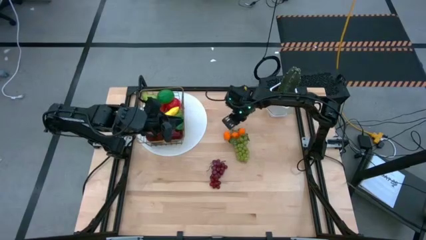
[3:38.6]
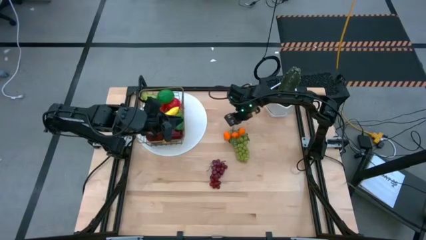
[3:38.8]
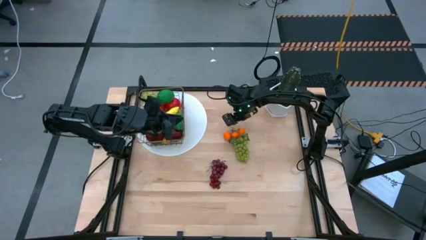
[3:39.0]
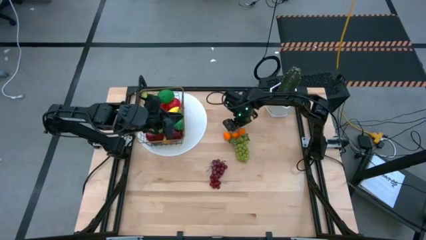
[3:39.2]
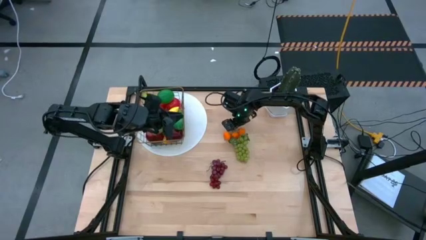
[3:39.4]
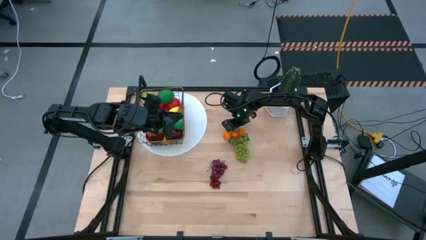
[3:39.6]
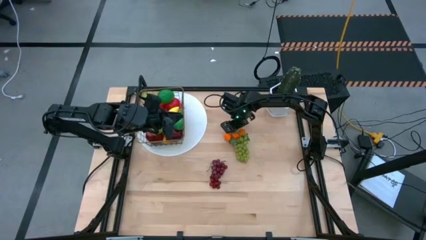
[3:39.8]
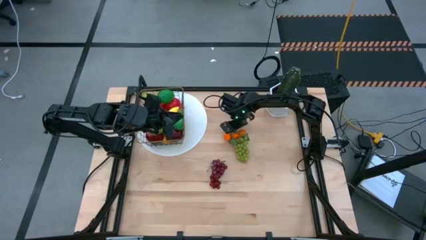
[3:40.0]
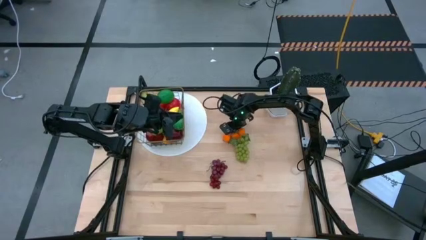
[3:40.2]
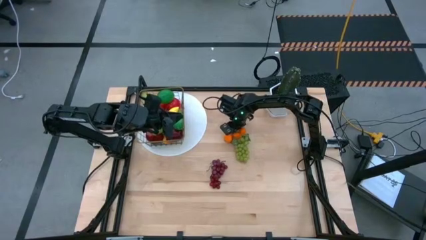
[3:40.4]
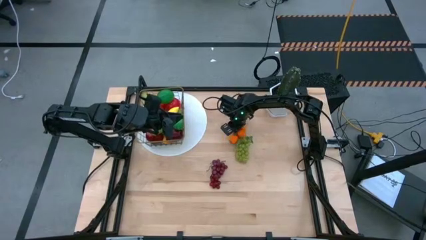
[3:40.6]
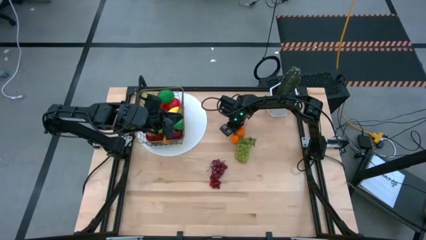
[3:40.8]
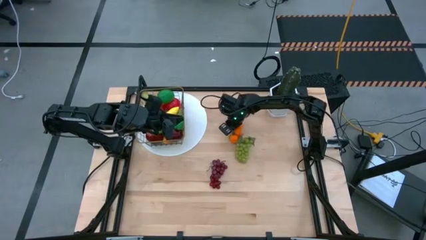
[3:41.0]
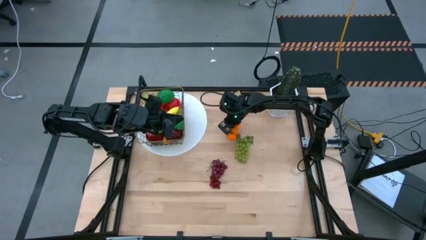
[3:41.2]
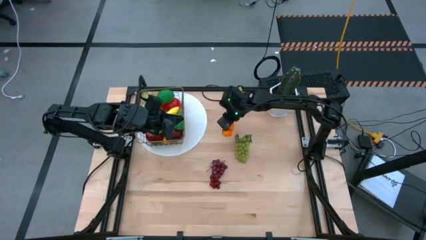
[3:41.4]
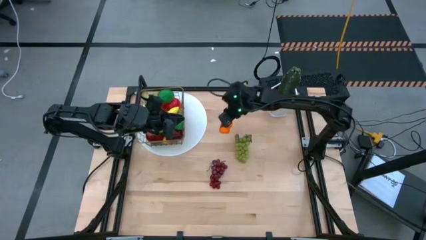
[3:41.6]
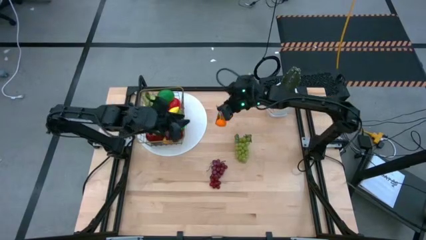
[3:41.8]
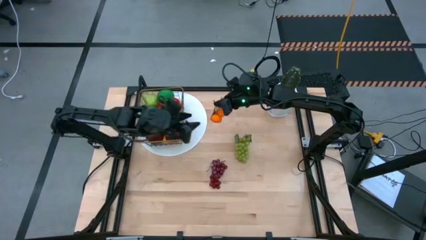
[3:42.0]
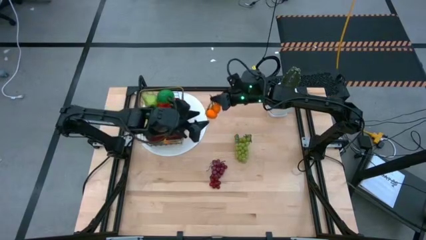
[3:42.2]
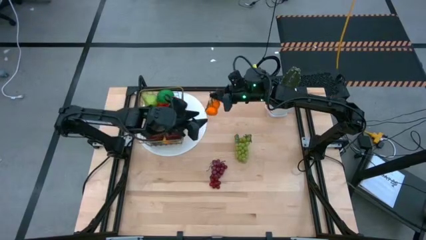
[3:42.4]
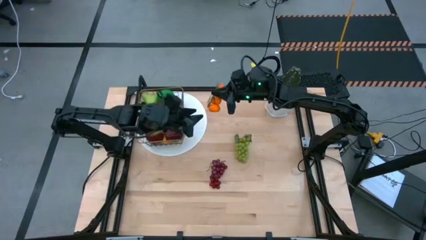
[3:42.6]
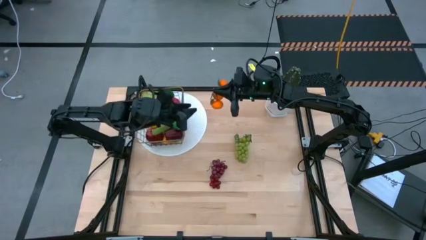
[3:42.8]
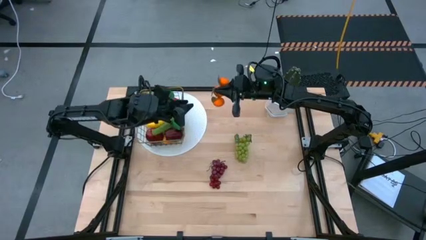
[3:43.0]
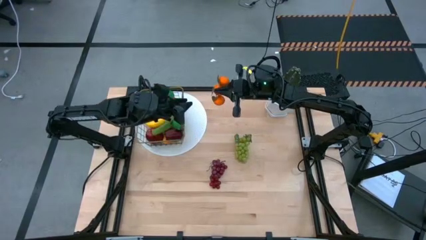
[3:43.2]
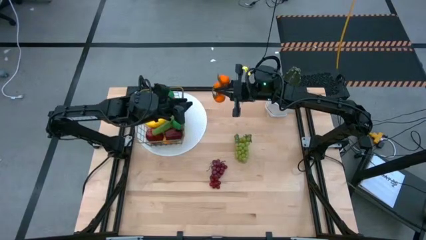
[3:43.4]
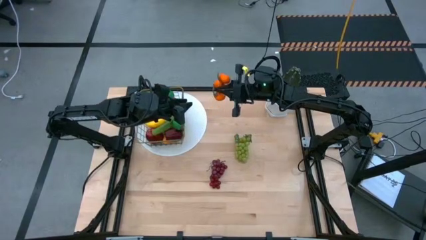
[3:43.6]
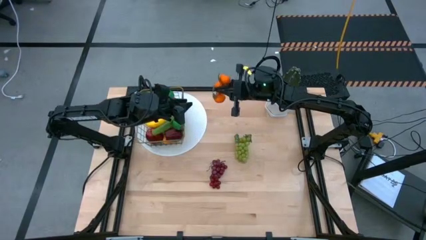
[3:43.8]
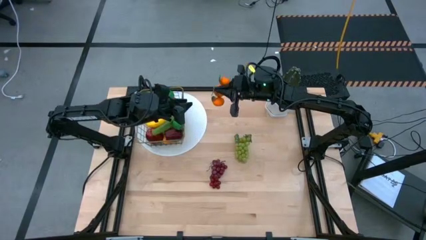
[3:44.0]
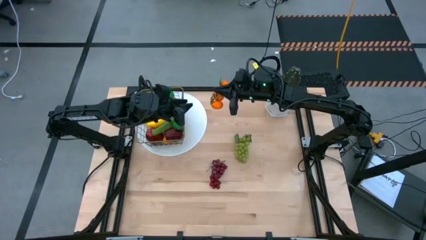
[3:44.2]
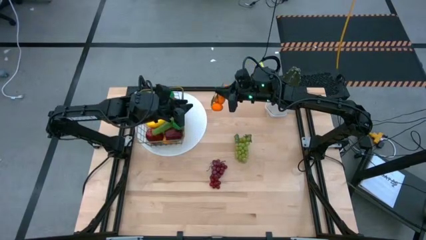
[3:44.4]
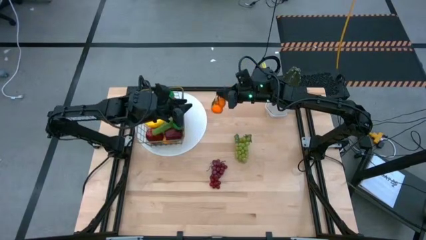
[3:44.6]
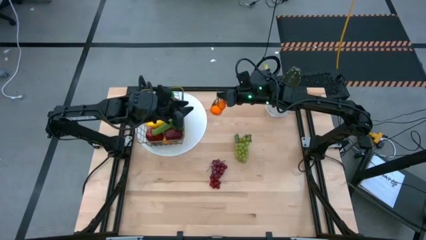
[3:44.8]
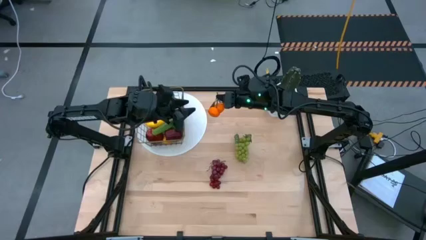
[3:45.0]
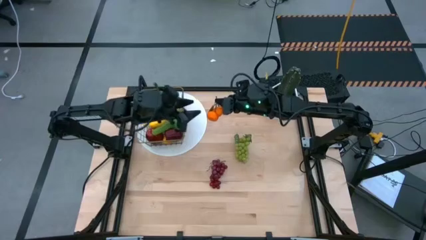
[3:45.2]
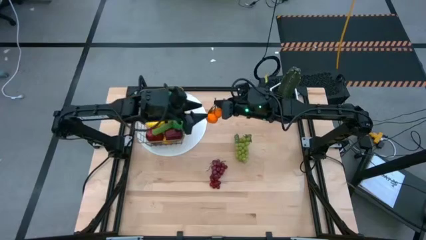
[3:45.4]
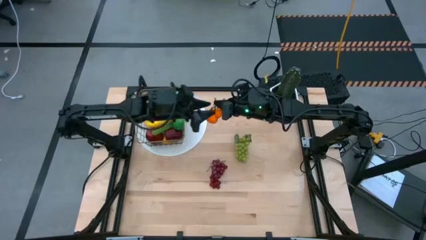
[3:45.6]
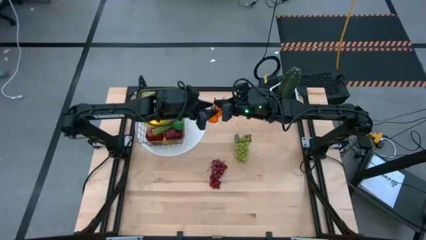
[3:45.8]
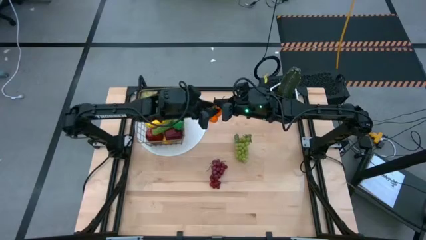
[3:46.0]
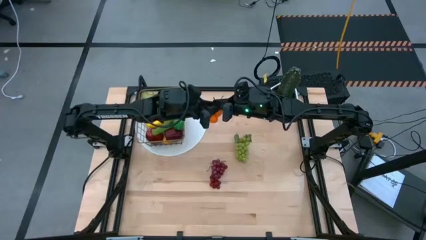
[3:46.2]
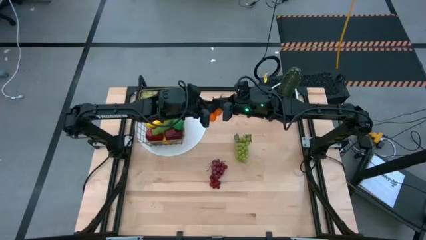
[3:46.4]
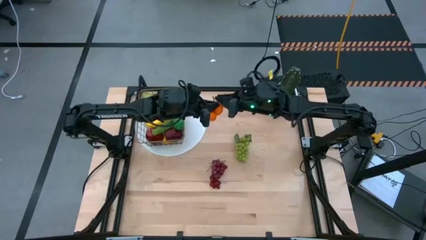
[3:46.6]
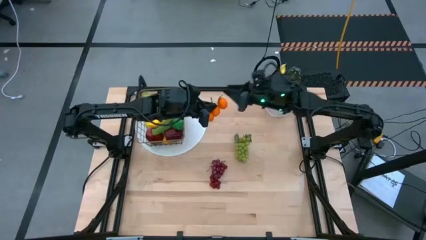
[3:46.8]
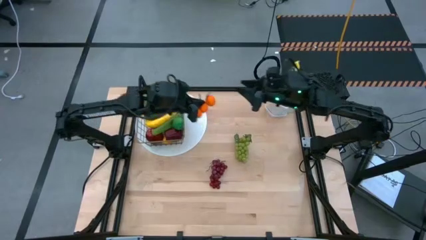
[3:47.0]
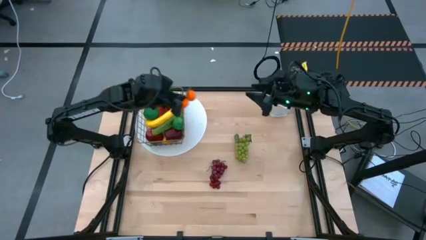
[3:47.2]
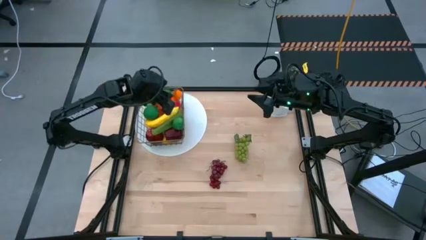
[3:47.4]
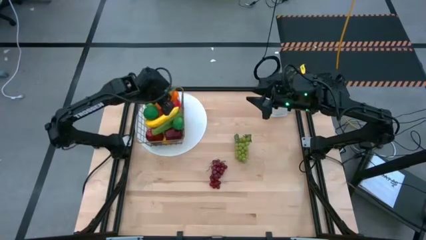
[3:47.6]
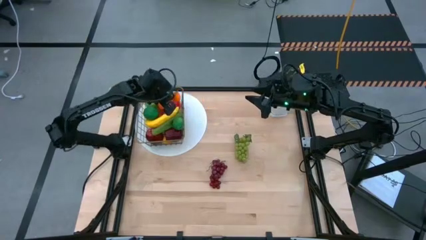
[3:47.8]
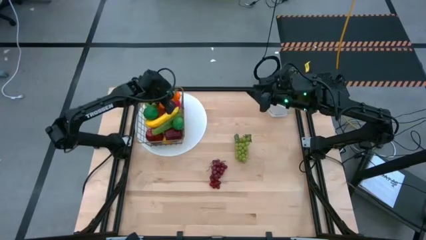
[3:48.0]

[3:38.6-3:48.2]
Task: Build produce basket
Put the orange tangerine into the wire basket

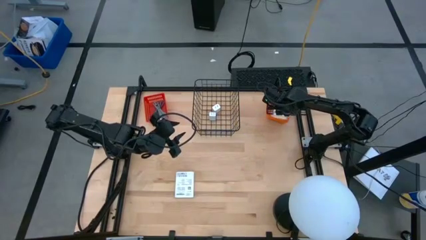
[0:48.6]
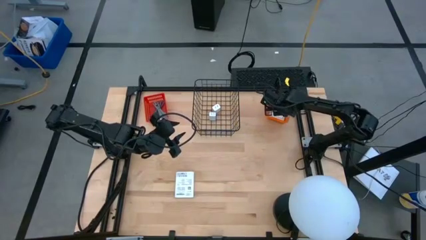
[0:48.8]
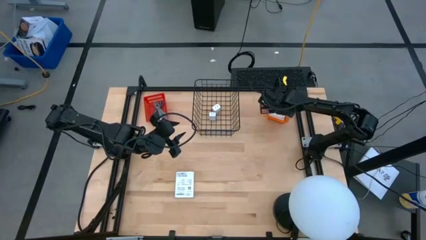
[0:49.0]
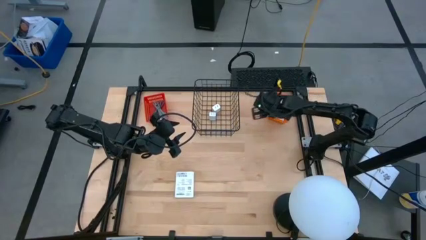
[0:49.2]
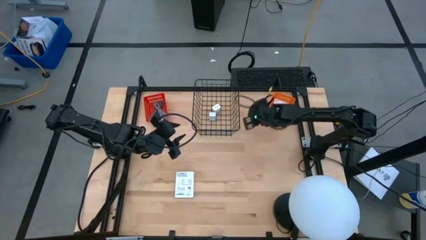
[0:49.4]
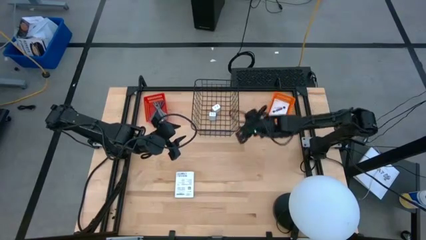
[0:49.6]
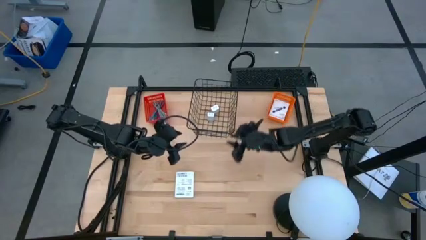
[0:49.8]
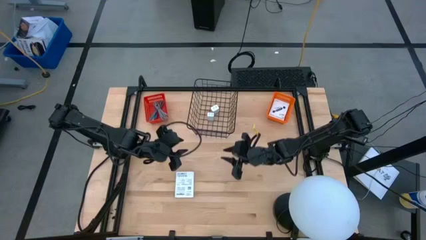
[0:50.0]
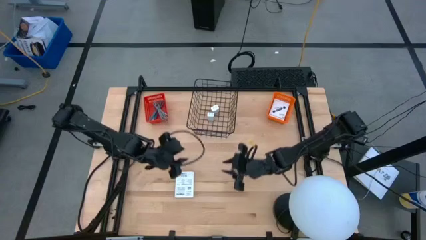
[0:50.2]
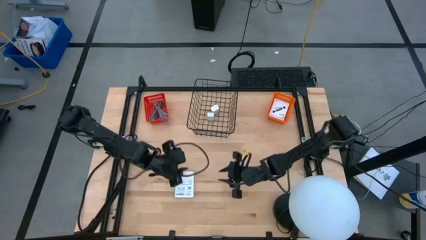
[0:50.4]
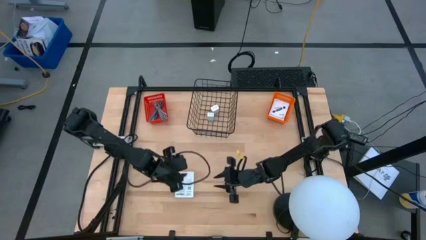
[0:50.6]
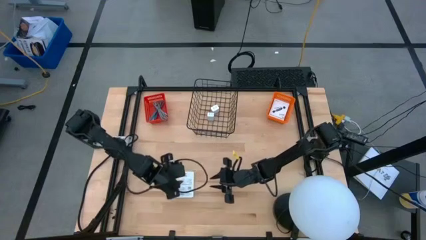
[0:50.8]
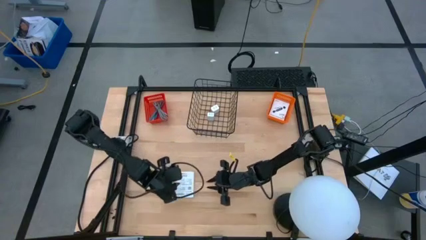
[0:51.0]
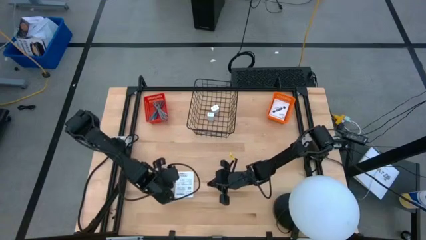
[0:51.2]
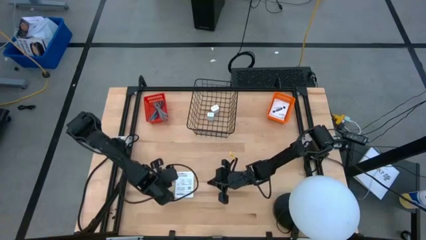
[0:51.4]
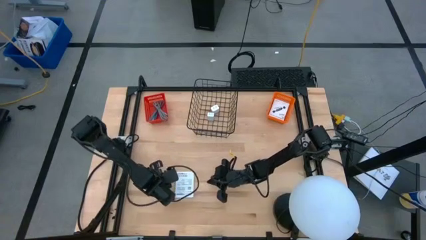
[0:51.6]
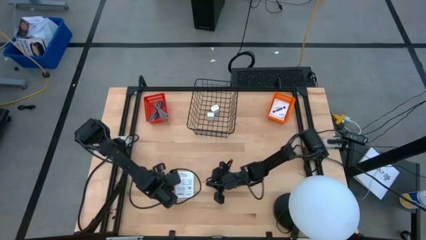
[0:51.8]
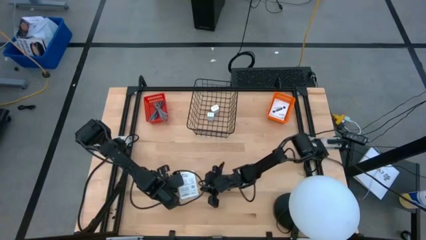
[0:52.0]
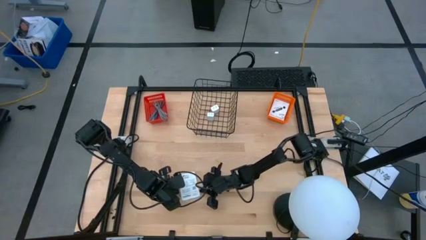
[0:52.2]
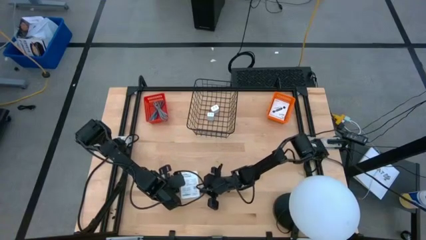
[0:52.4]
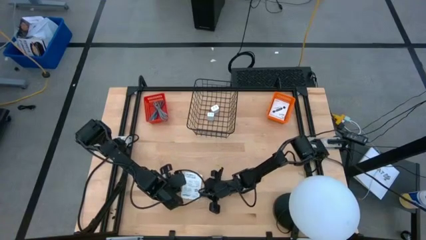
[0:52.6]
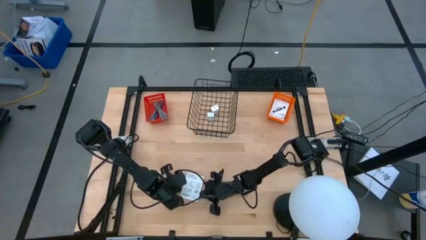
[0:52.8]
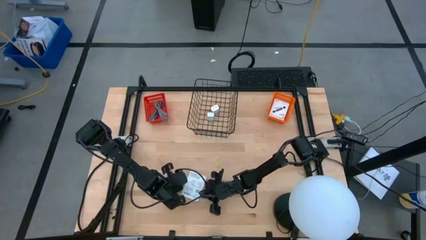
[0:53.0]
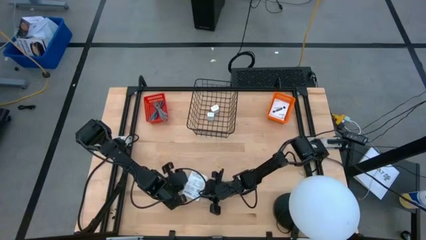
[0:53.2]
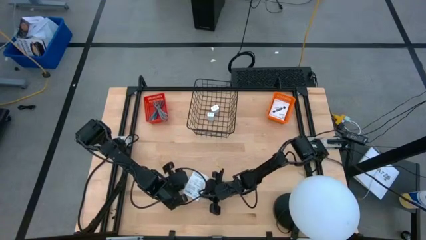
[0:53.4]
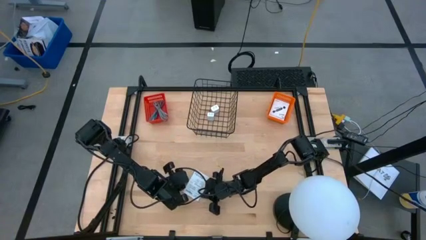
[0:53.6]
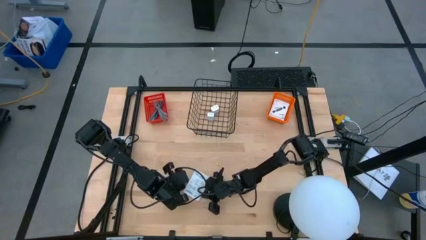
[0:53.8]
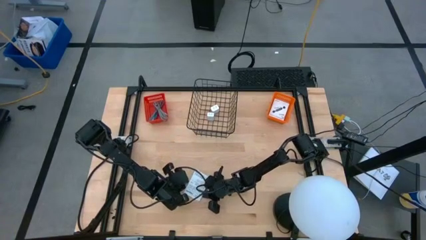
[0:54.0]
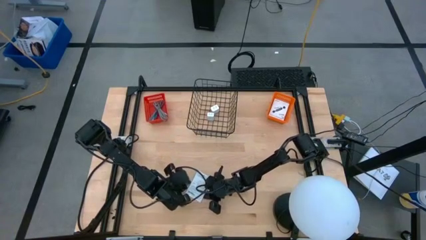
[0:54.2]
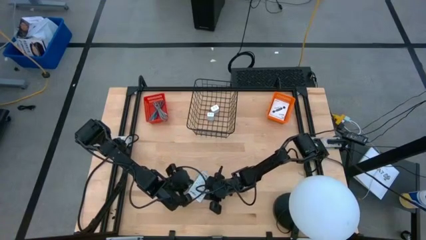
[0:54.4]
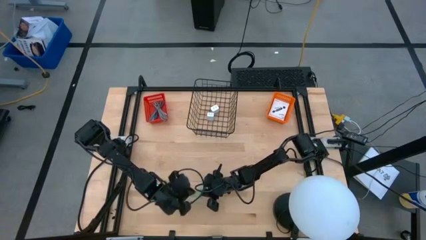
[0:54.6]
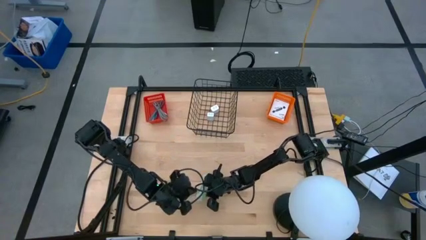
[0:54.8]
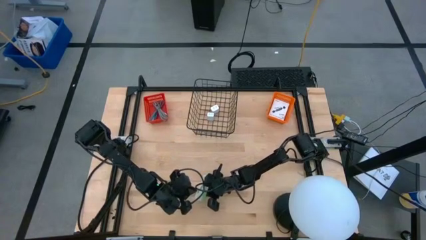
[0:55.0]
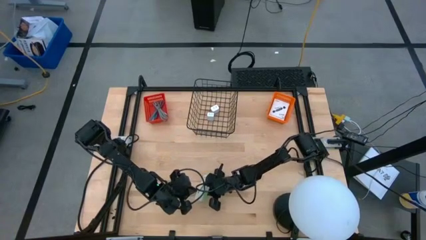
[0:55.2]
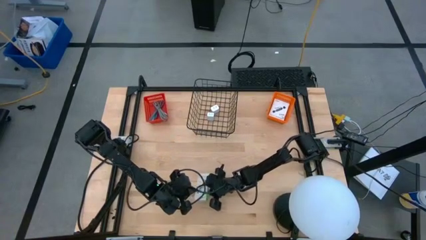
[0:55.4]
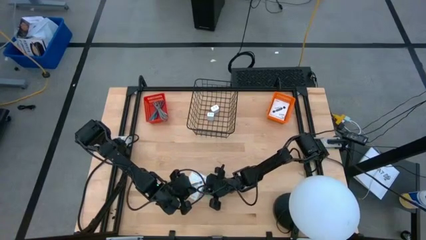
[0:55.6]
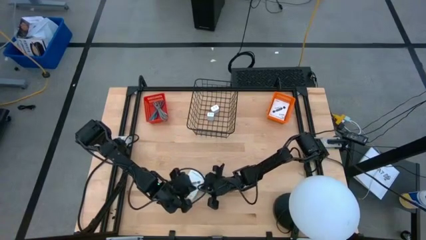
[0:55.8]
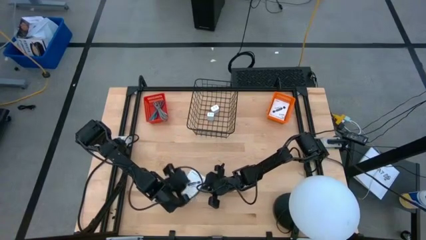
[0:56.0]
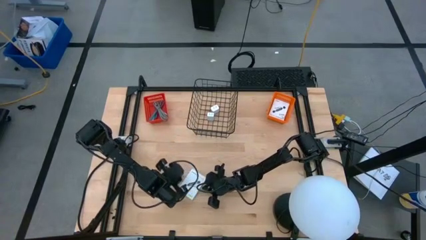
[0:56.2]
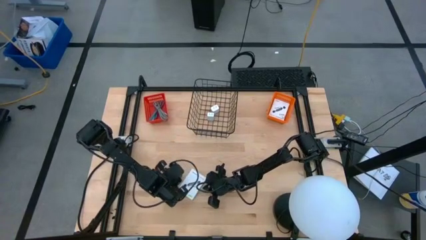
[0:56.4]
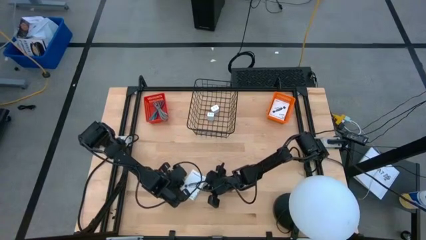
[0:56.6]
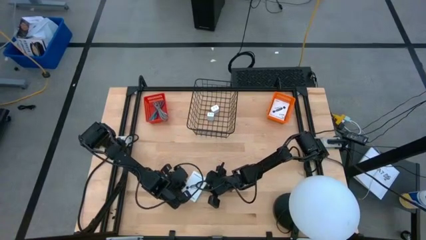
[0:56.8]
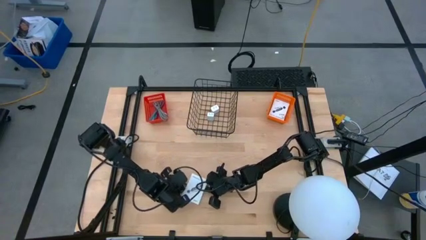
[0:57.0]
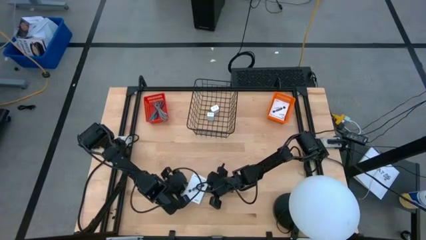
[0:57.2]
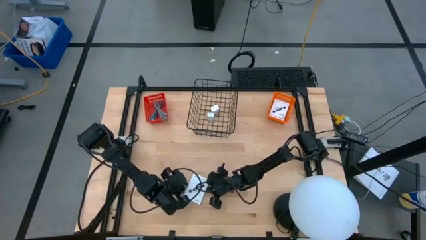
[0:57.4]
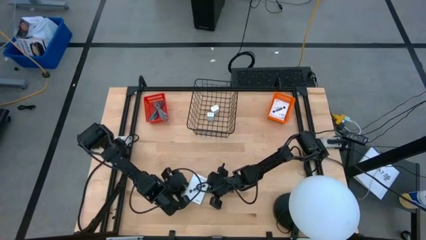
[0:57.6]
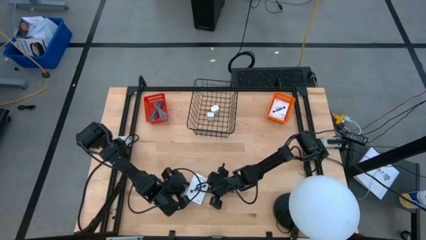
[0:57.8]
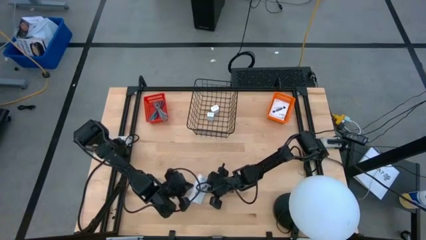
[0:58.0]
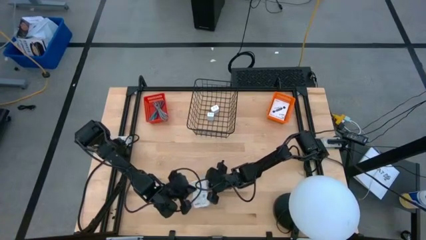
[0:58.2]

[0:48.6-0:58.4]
Task: Pick and place items into bin
Put the card reader box into the orange basket
